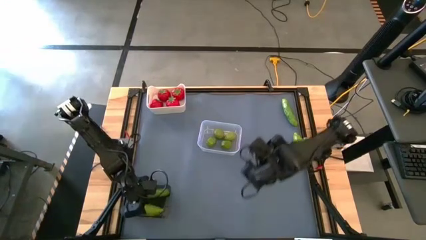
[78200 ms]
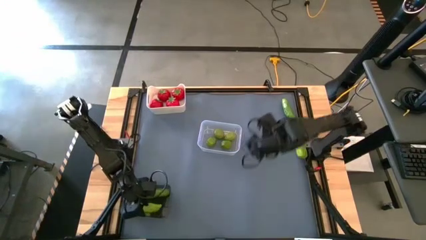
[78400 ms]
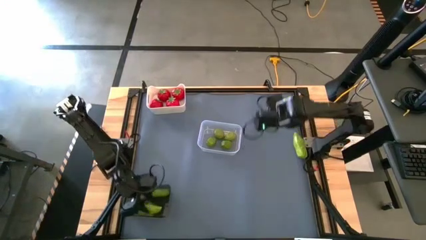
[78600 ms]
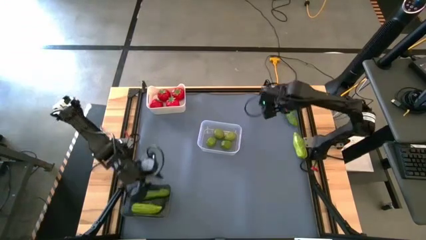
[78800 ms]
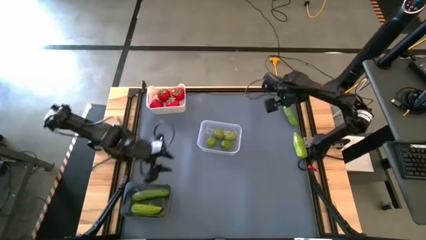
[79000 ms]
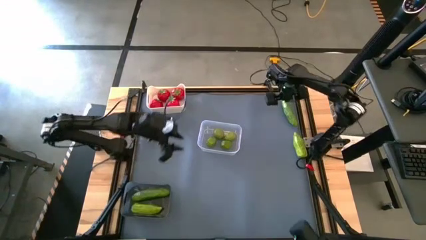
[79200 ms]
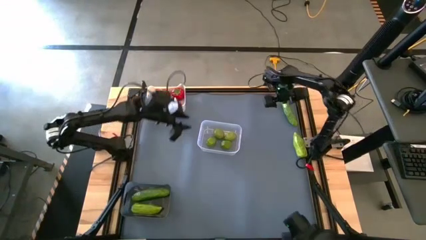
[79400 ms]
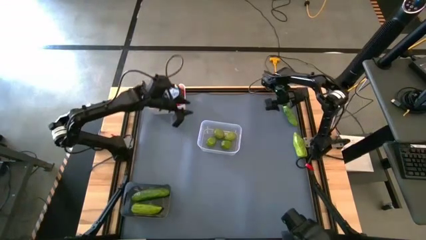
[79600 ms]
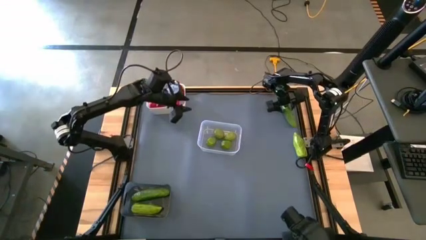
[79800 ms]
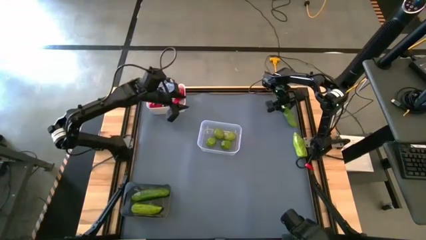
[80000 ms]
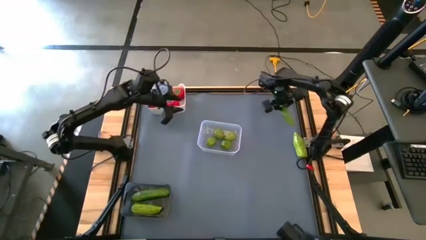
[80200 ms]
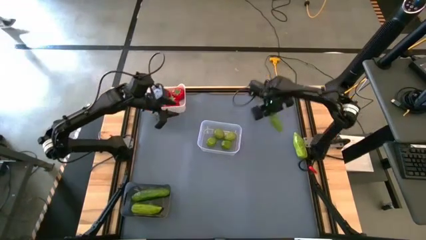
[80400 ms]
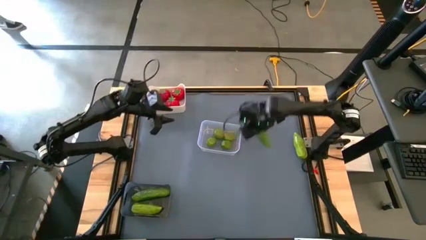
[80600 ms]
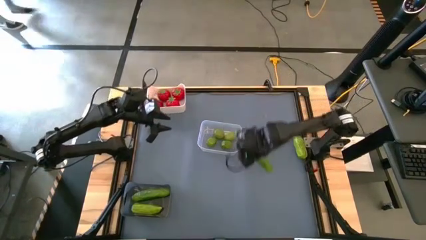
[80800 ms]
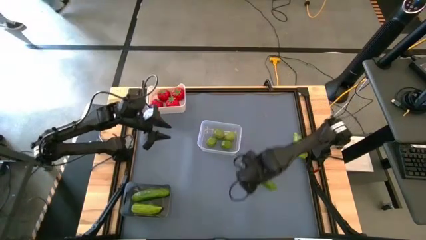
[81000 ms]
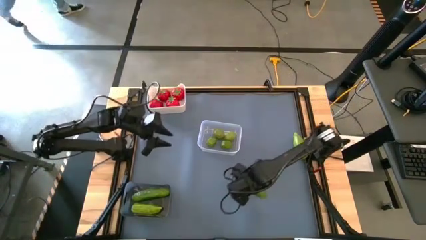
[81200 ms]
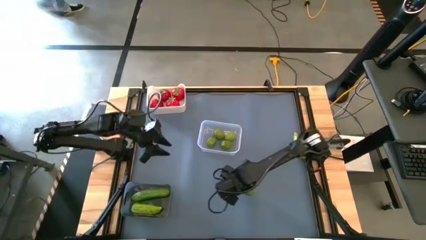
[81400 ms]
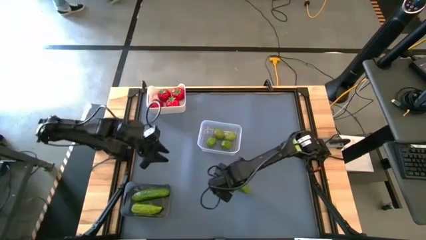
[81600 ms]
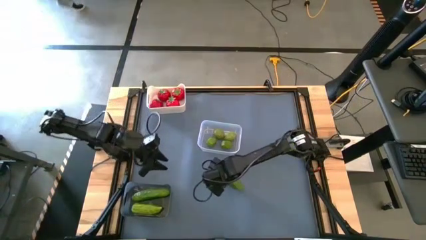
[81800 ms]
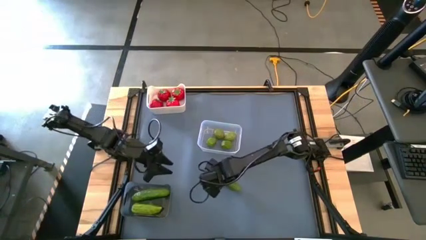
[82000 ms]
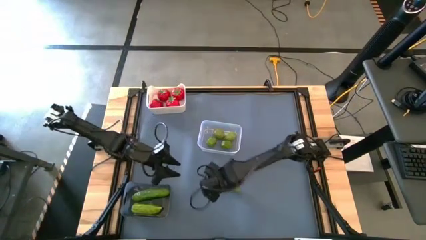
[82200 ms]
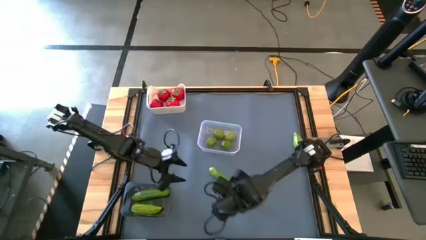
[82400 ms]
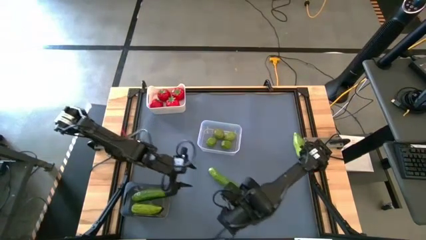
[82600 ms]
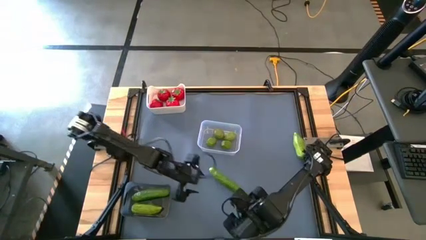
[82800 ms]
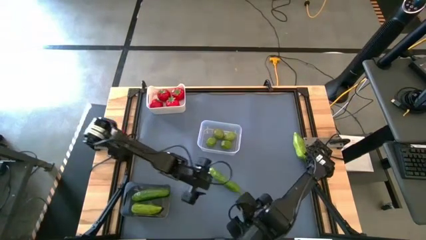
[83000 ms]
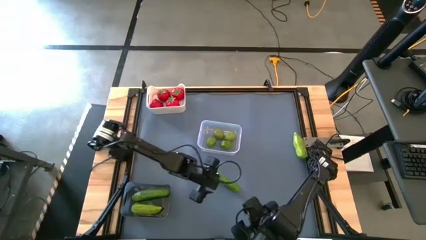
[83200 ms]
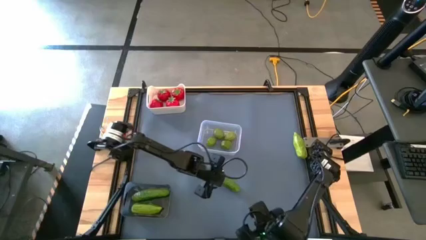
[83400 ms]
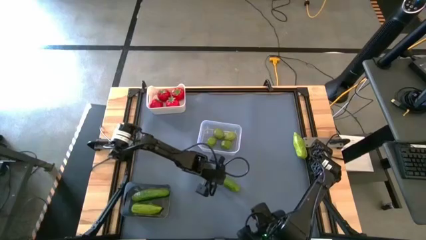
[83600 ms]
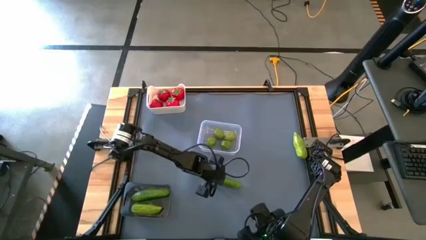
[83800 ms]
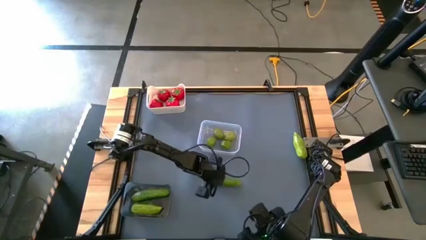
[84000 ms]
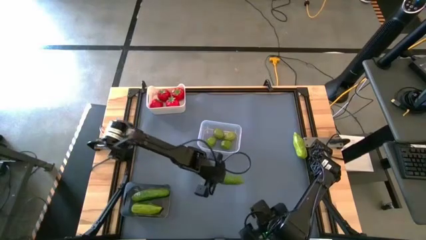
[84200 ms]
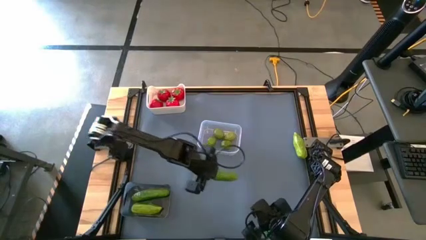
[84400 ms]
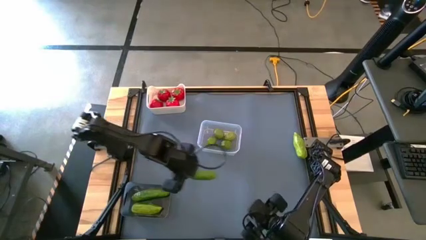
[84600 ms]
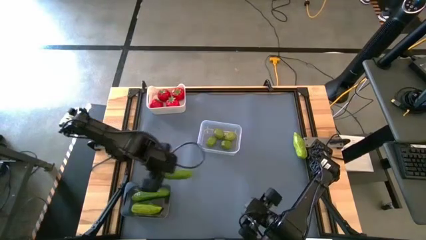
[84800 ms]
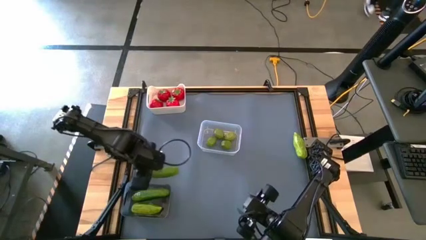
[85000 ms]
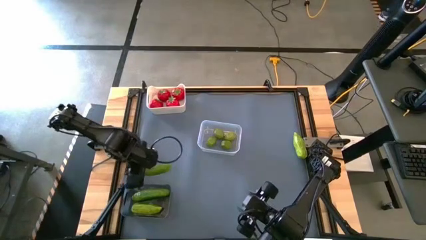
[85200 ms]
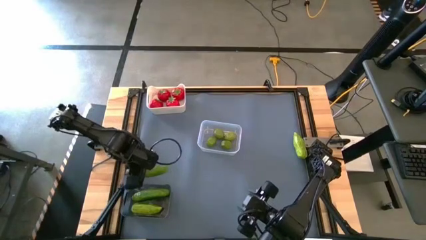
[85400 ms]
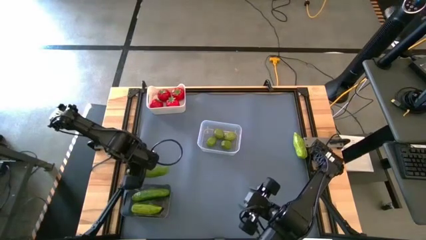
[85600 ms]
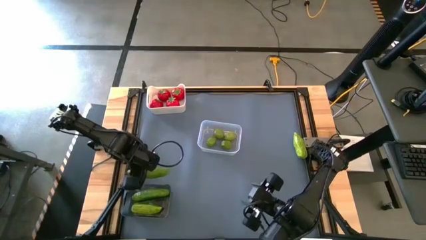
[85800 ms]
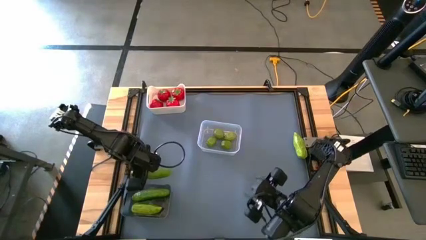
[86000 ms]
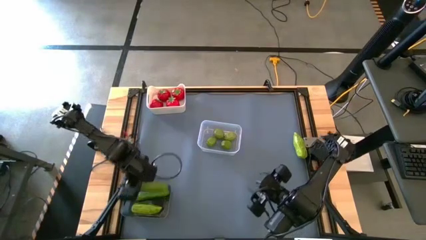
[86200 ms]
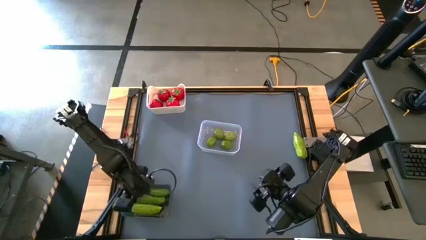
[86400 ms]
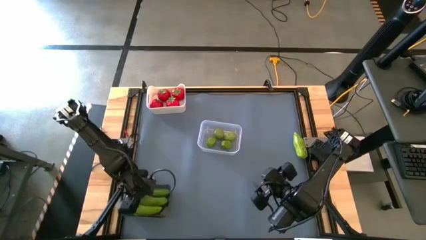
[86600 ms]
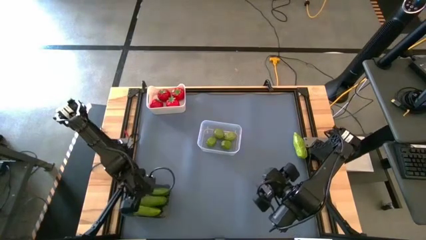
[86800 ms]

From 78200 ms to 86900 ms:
Task: Sort produce into baskets
Put the top cucumber into the black bin

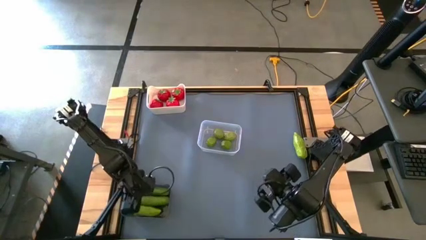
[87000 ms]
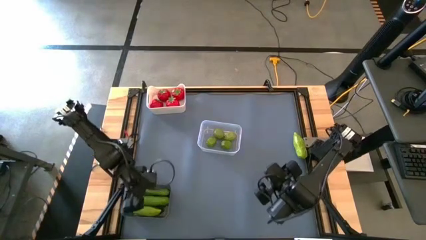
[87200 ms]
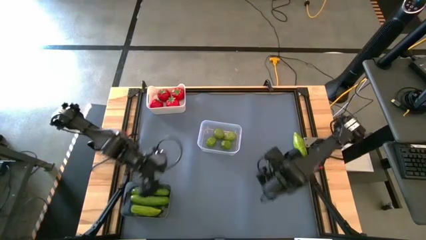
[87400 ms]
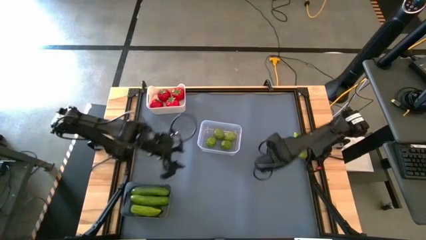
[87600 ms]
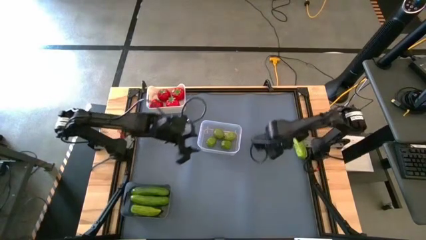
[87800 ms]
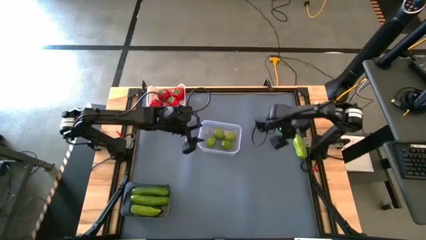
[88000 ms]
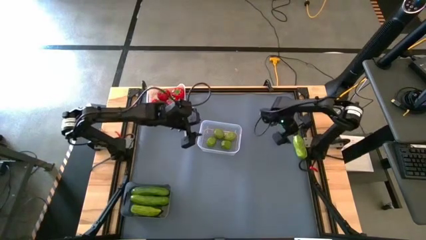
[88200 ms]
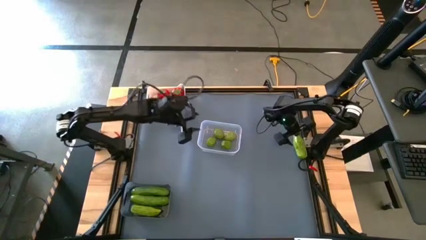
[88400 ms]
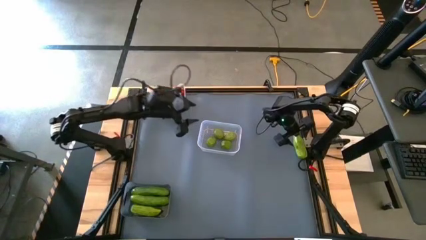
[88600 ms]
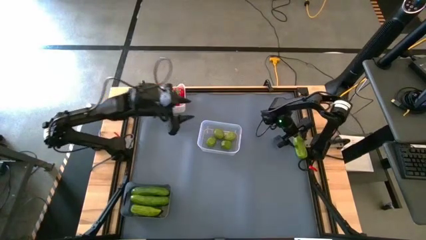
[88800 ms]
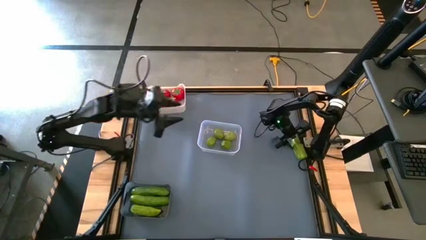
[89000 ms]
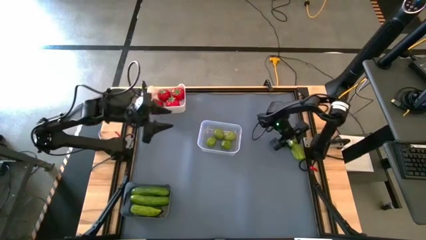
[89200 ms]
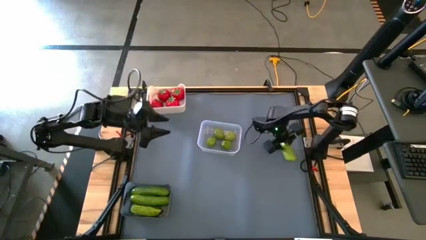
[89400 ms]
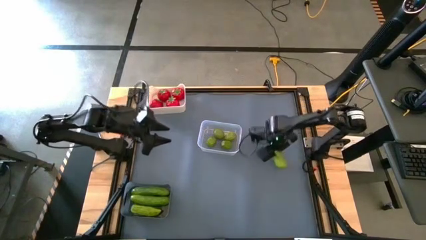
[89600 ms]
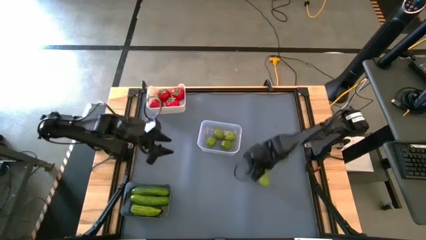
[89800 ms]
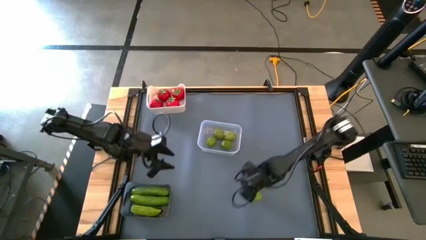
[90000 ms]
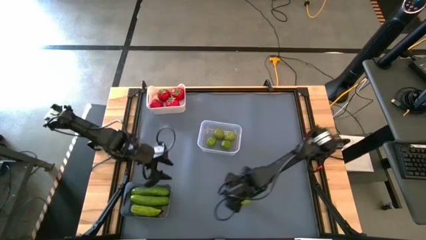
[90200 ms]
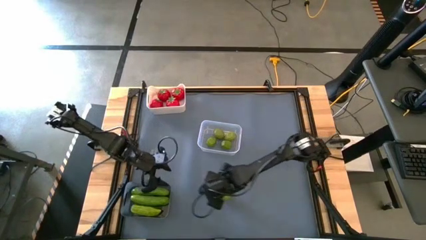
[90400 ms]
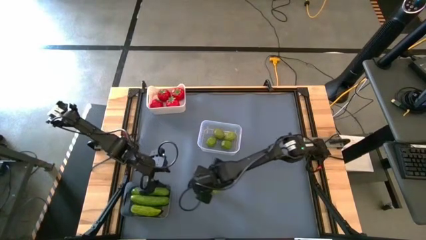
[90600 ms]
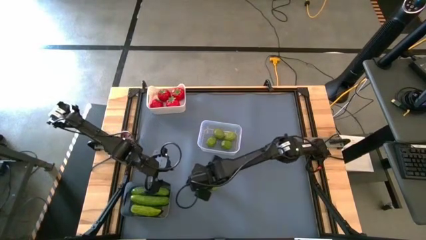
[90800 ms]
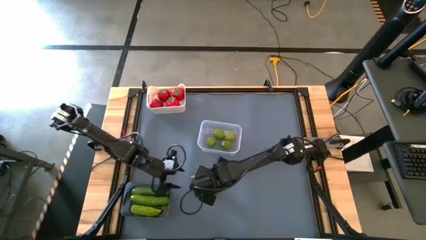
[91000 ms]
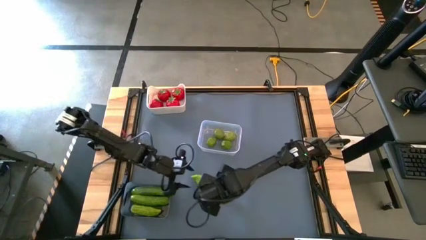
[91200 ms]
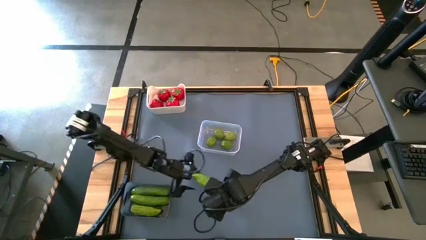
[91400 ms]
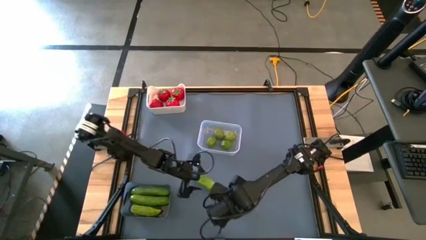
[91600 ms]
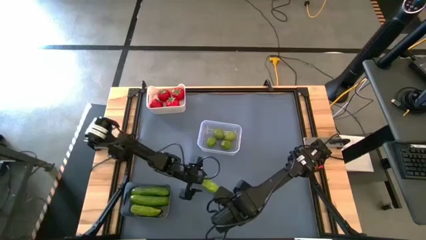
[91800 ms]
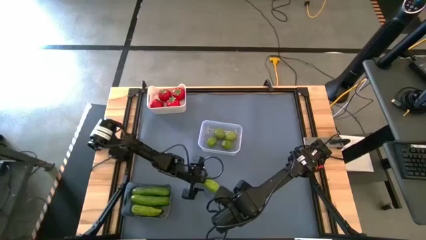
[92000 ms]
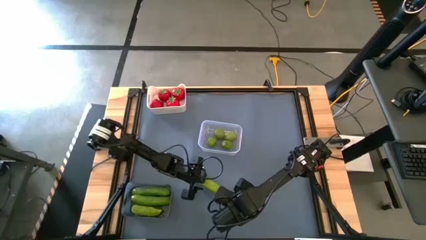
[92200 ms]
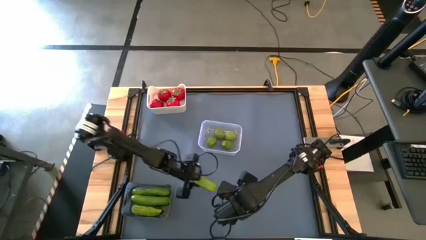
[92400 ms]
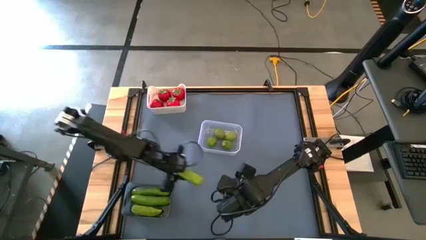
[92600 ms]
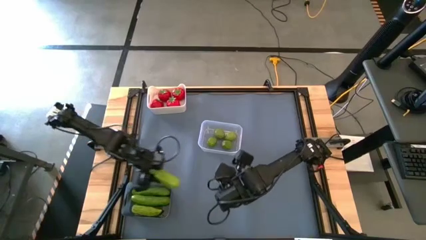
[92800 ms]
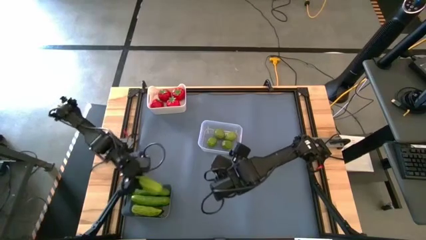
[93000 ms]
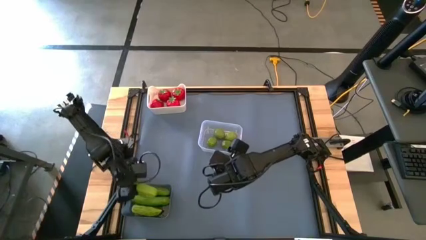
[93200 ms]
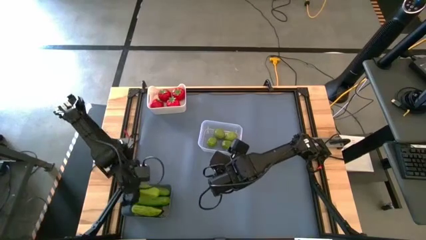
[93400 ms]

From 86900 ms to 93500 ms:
Put the cucumber into the black bin
